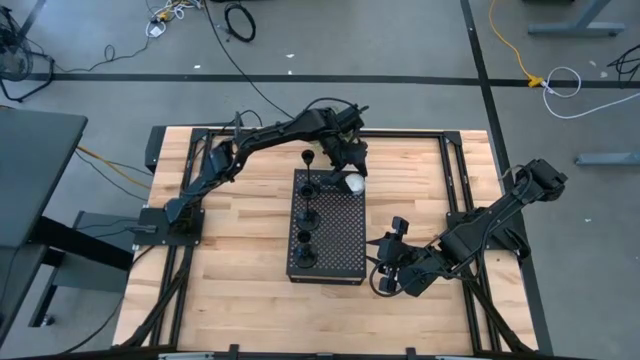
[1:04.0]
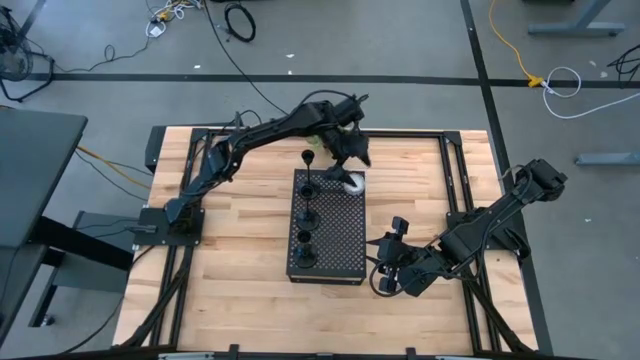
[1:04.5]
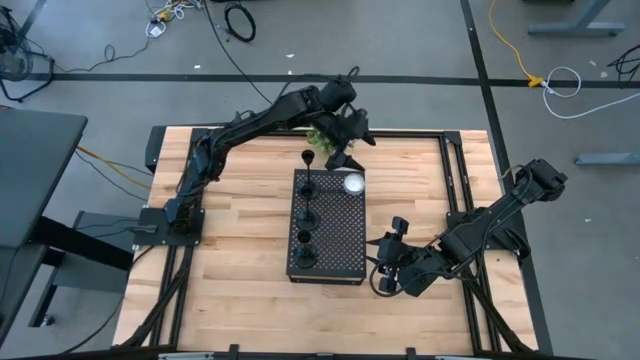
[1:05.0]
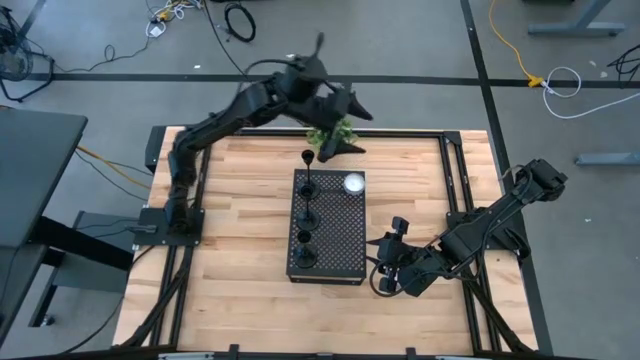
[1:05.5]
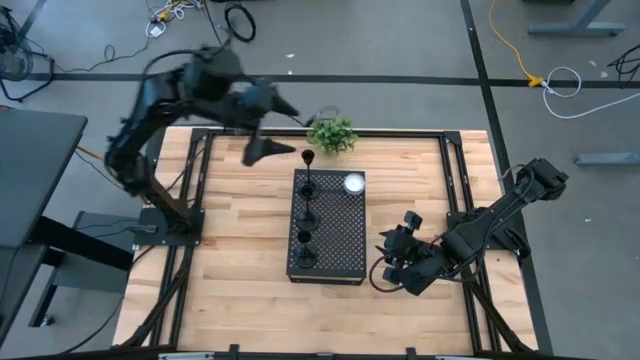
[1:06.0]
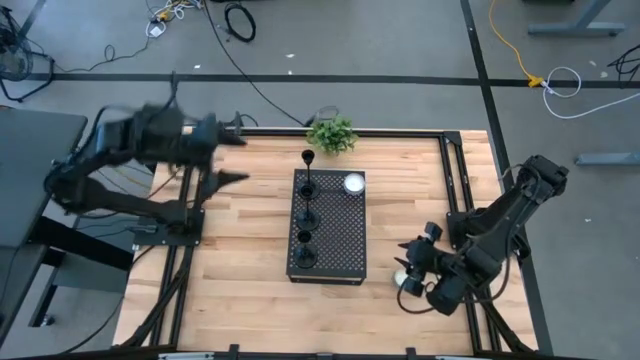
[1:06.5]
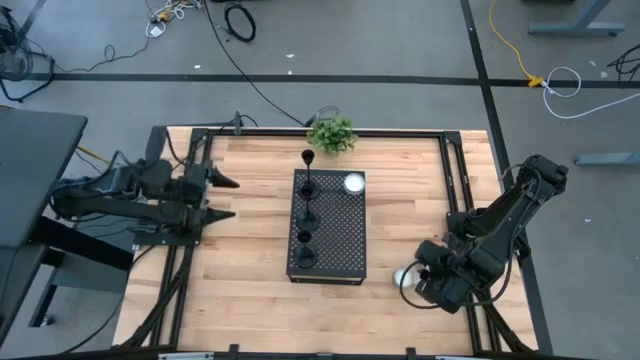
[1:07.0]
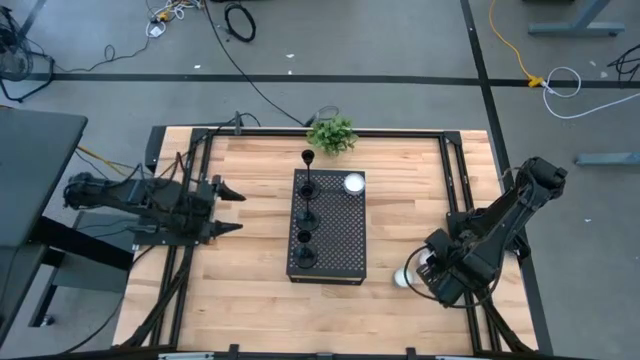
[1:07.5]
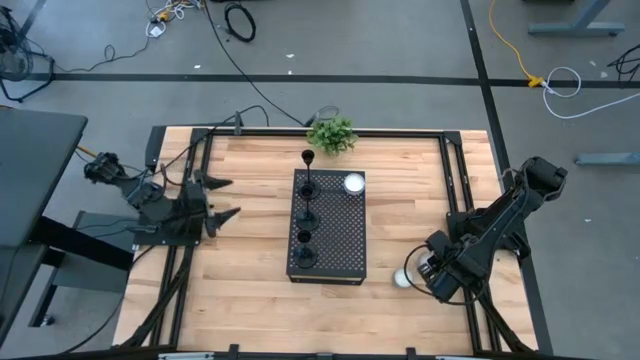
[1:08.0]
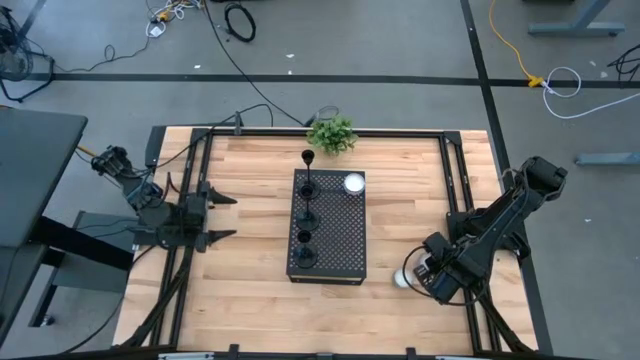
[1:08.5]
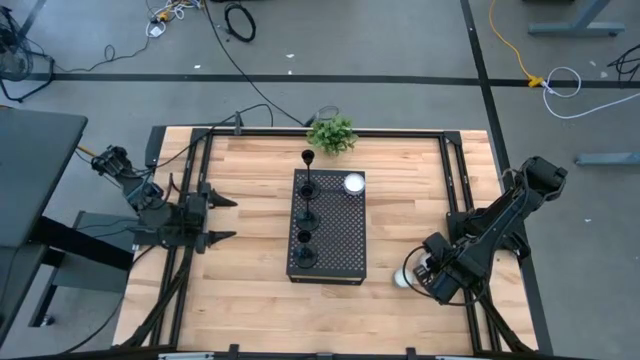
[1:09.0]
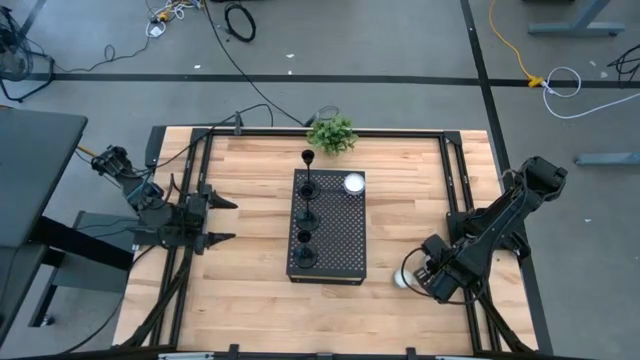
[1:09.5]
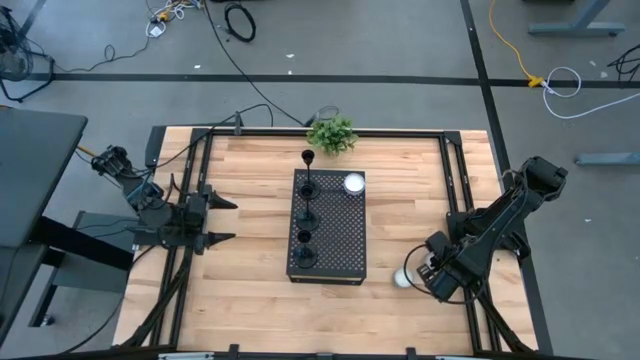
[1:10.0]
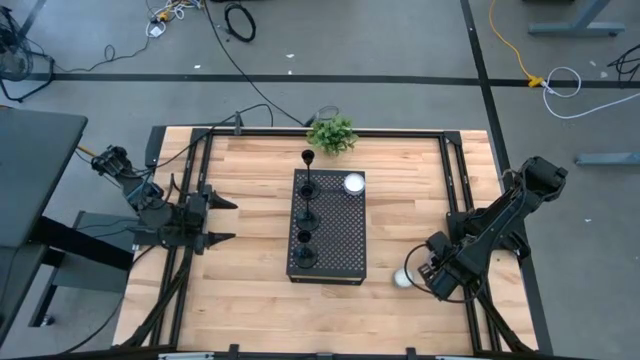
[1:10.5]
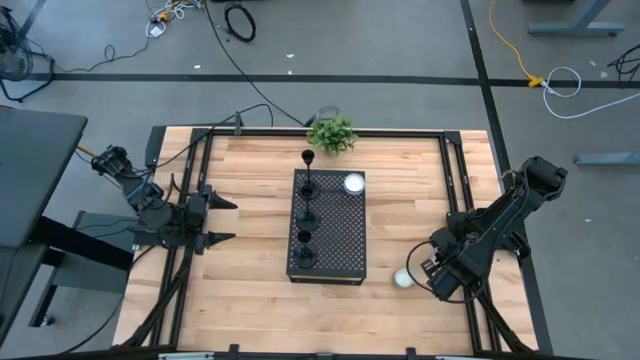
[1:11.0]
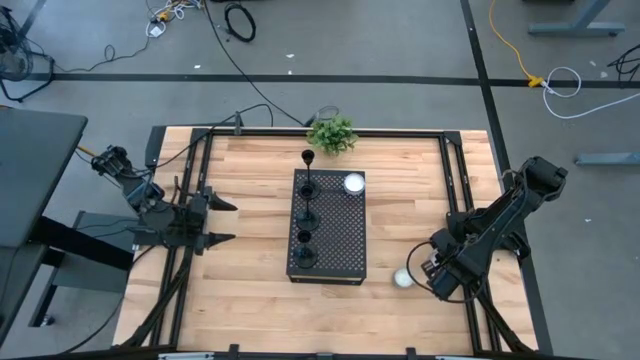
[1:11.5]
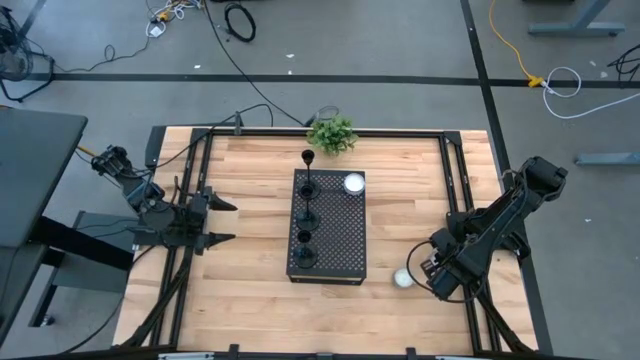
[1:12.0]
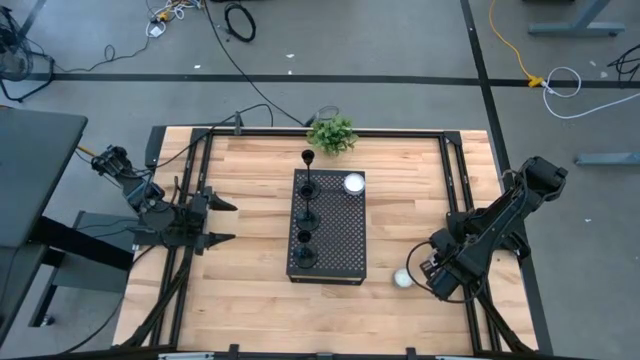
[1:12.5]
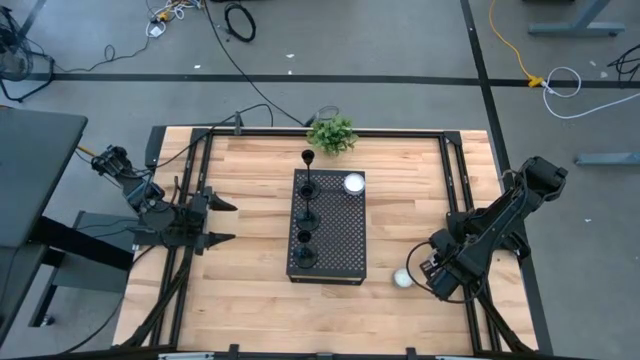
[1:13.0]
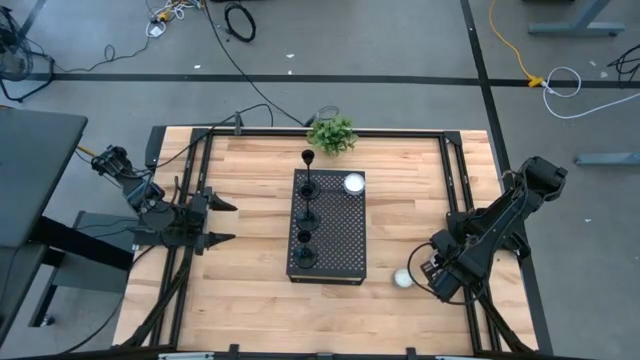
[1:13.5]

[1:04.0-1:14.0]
Task: Pick & Place candle stick holders
Put the pink scented candle on the shelf aligned with the other scented candle

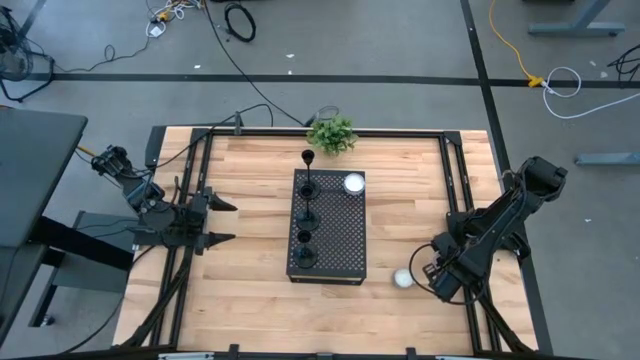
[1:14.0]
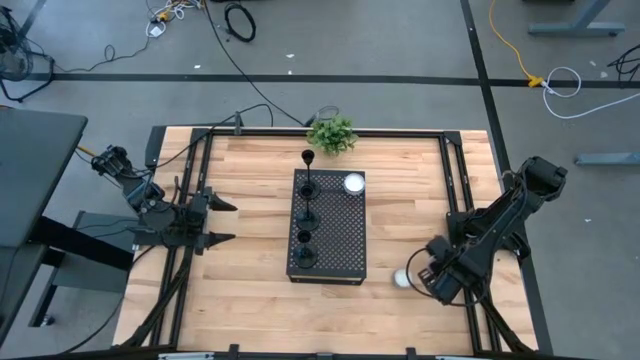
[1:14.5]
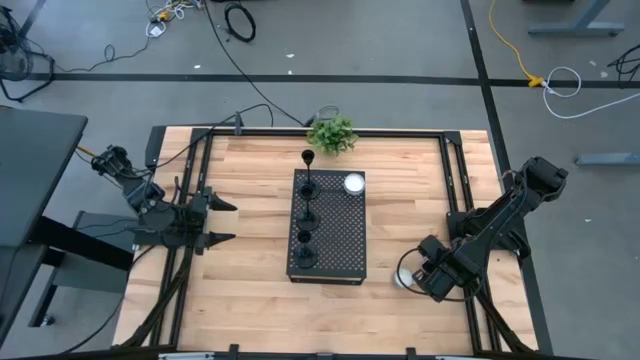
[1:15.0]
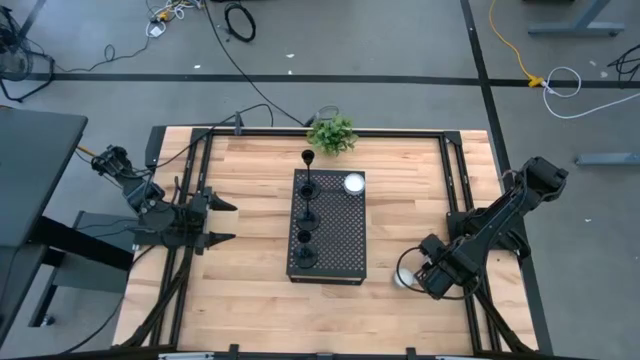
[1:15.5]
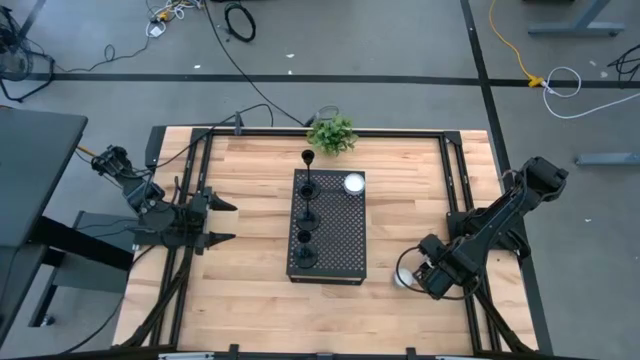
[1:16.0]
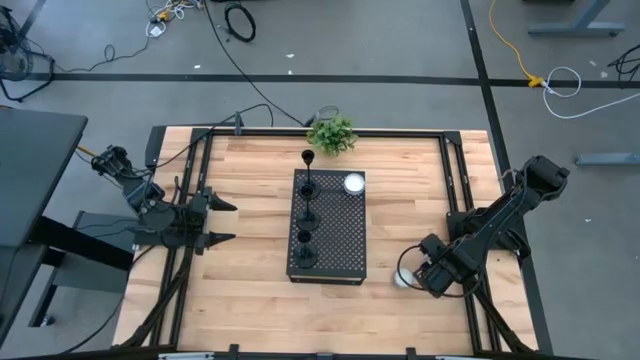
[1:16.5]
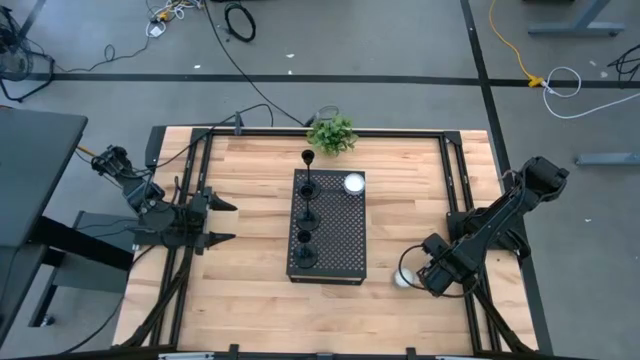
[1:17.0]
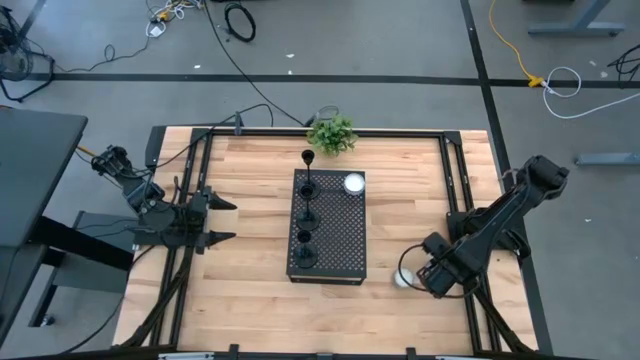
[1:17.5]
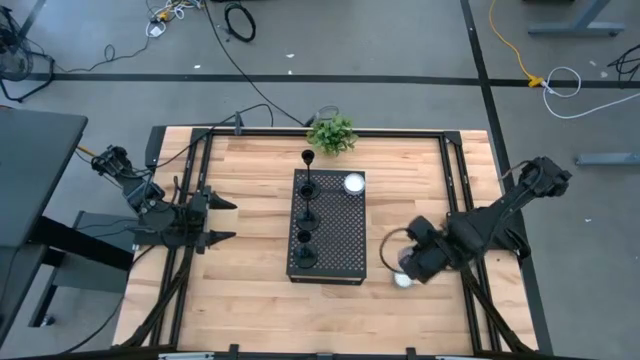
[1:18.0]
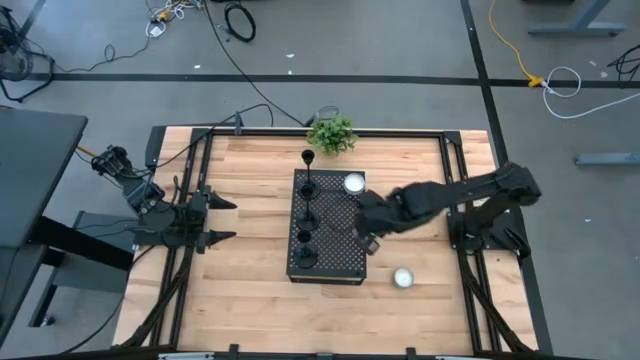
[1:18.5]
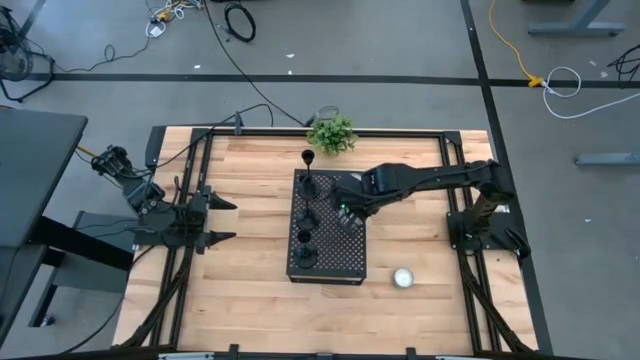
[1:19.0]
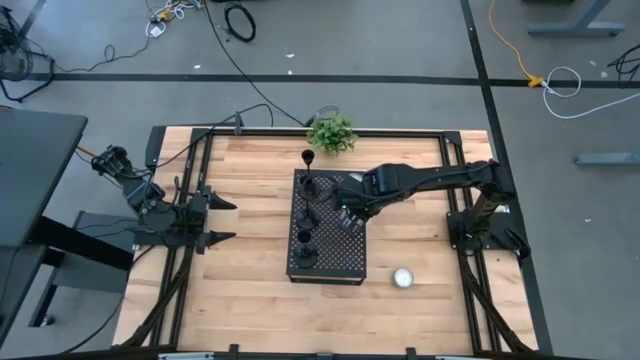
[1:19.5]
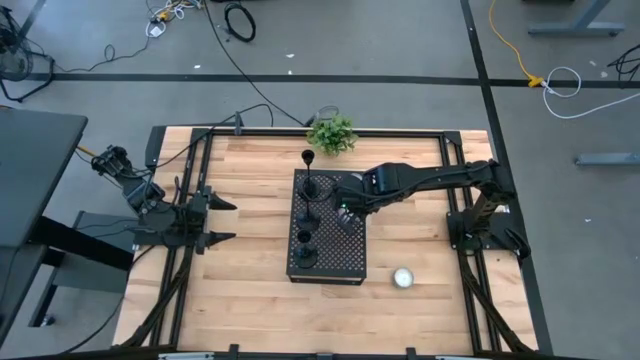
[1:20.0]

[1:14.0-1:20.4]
Put the pink scented candle on the shelf aligned with the other scented candle

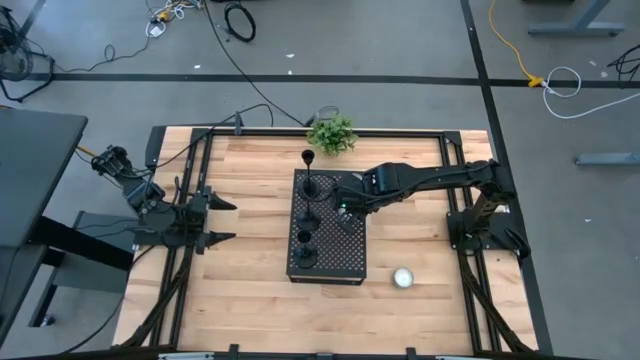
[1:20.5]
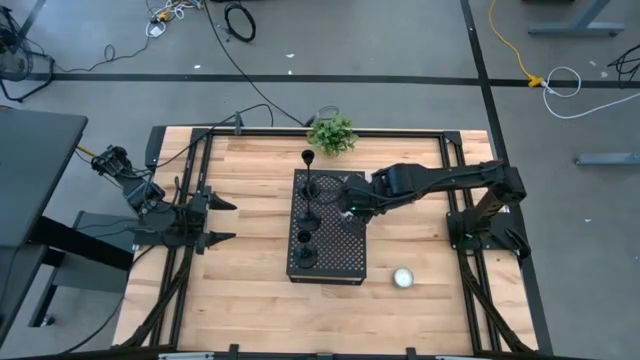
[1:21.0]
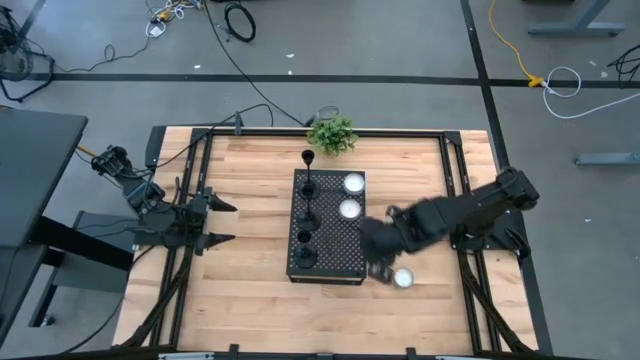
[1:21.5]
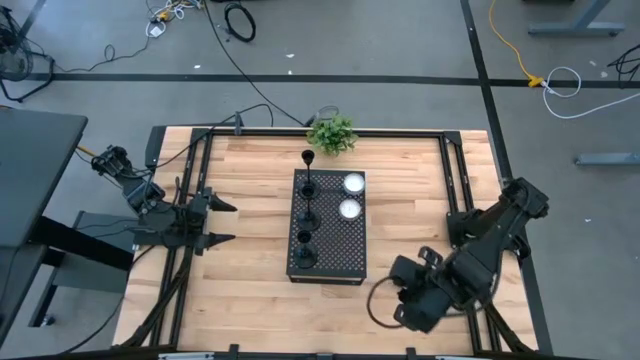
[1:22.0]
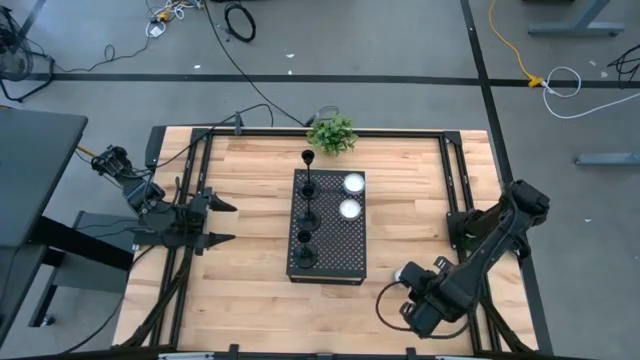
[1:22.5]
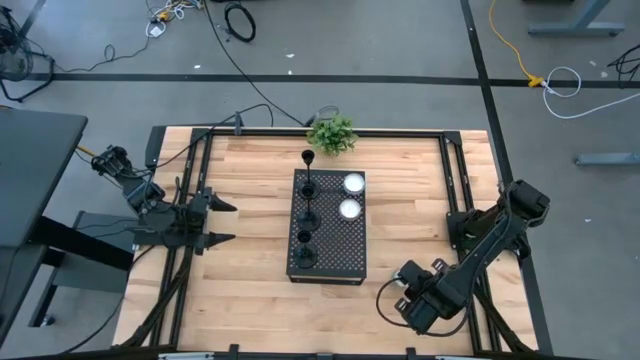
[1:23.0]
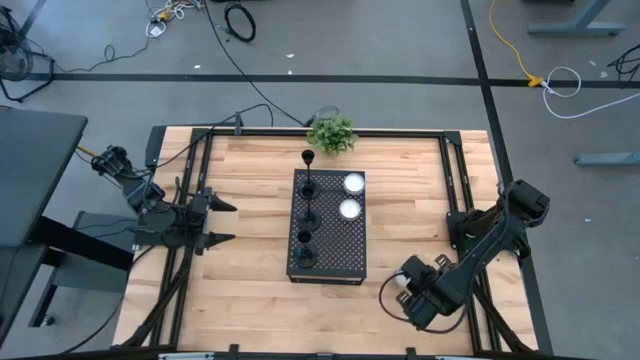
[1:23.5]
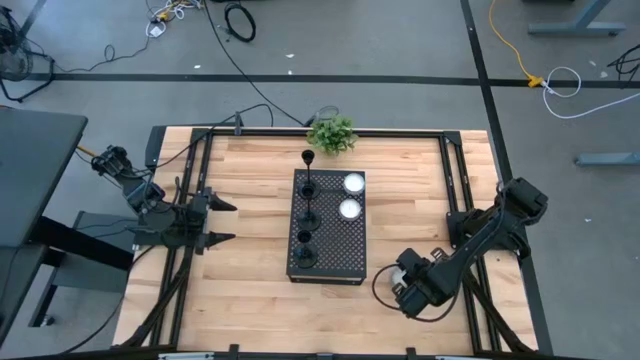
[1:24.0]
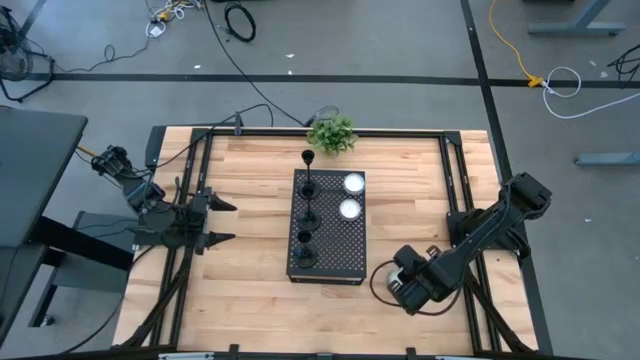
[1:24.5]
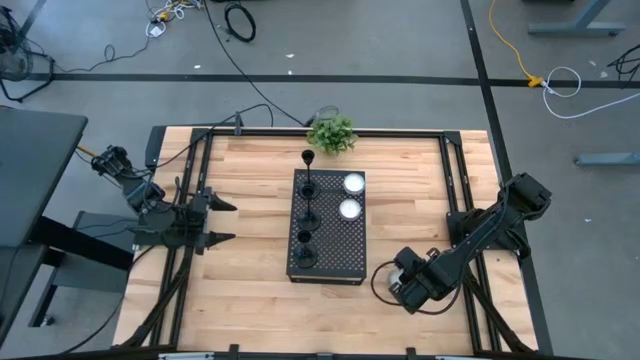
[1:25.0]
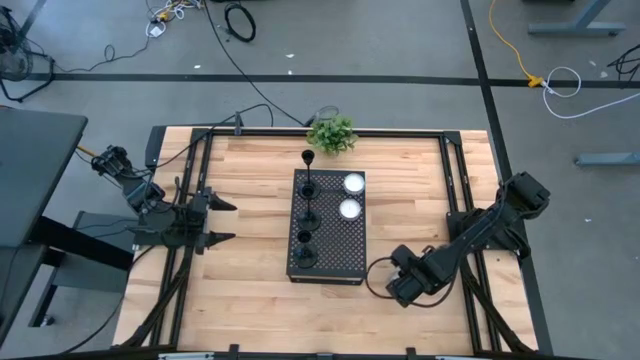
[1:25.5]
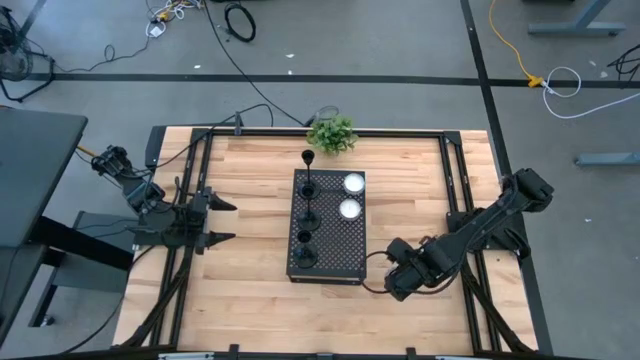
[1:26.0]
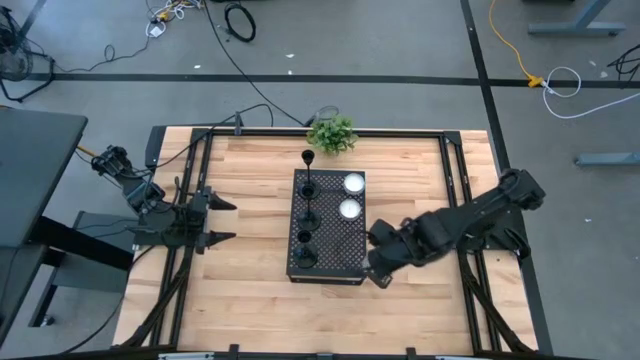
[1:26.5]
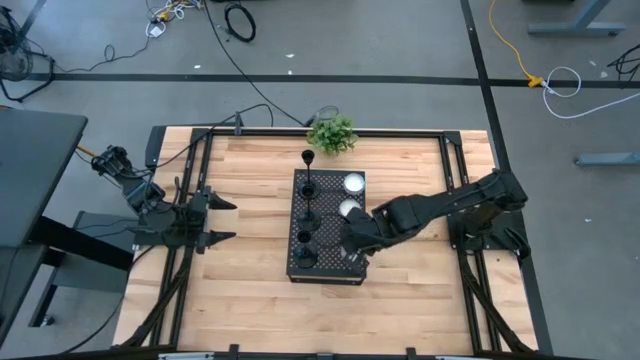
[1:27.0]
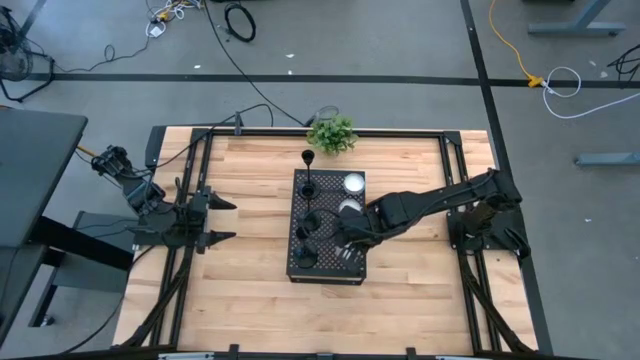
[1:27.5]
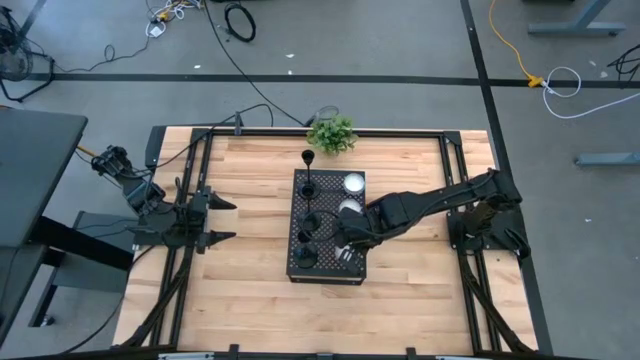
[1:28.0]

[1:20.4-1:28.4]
Put the yellow scented candle on the shelf aligned with the other scented candles
